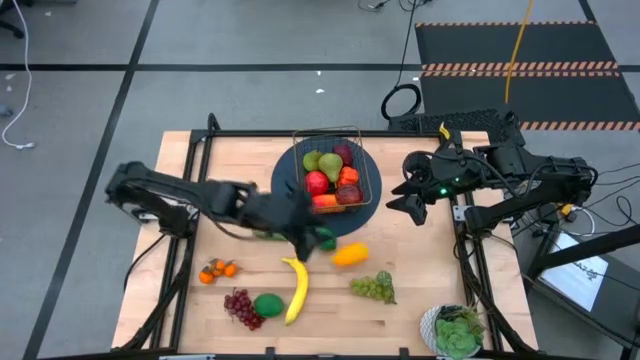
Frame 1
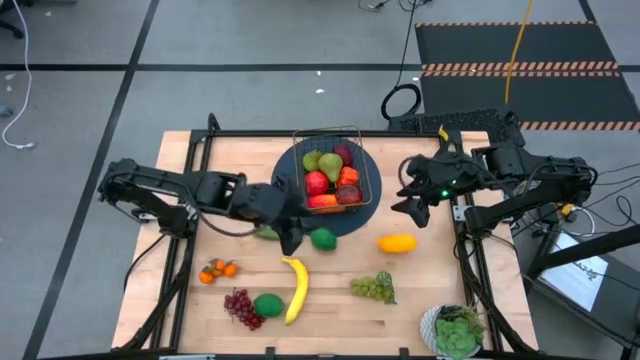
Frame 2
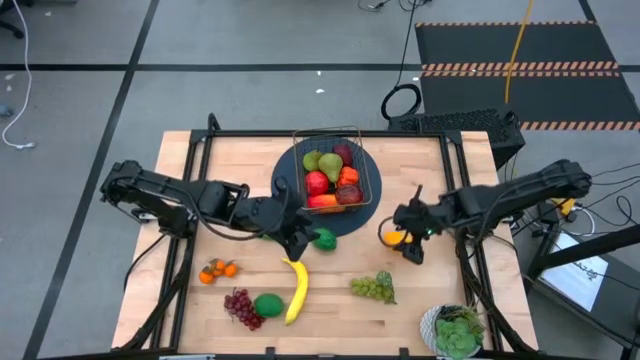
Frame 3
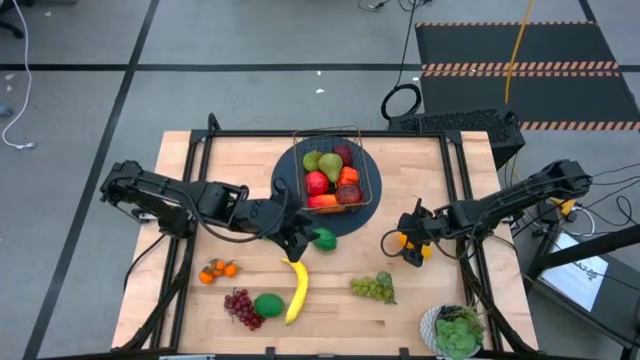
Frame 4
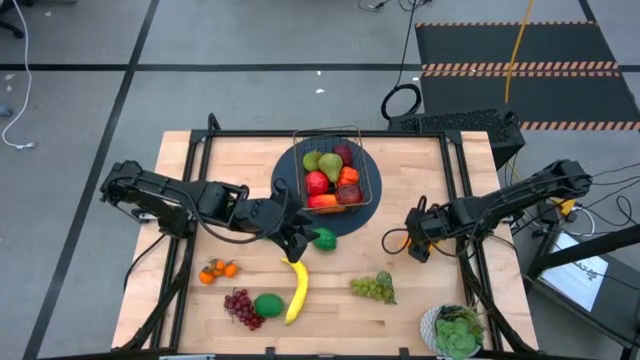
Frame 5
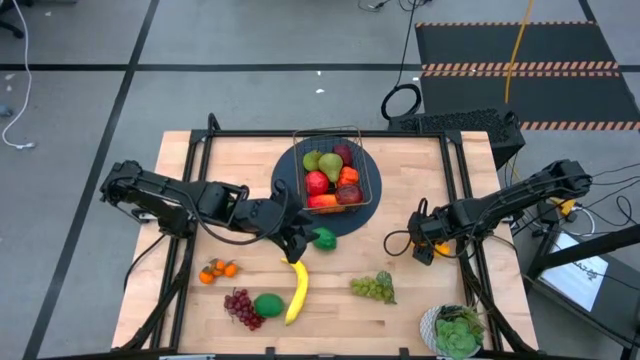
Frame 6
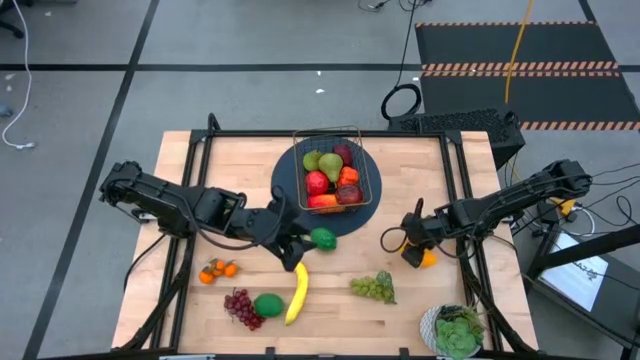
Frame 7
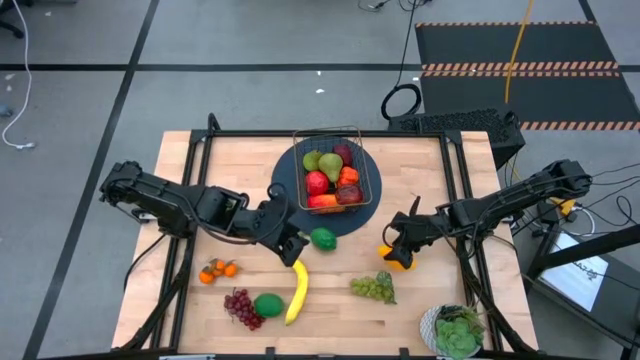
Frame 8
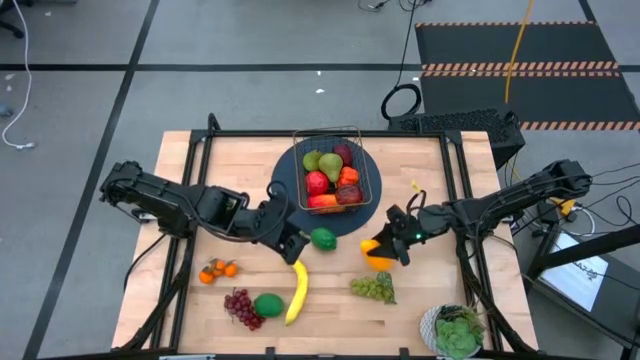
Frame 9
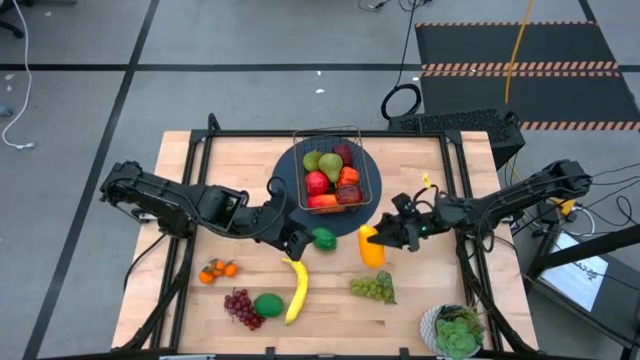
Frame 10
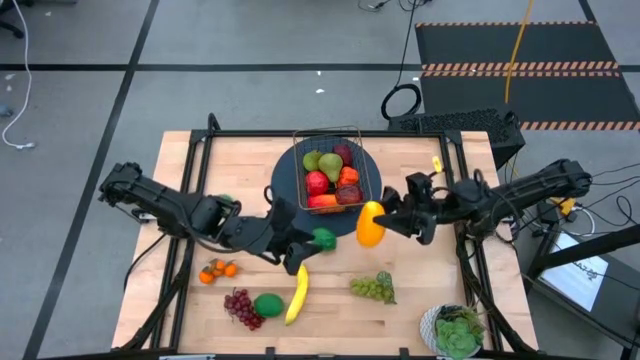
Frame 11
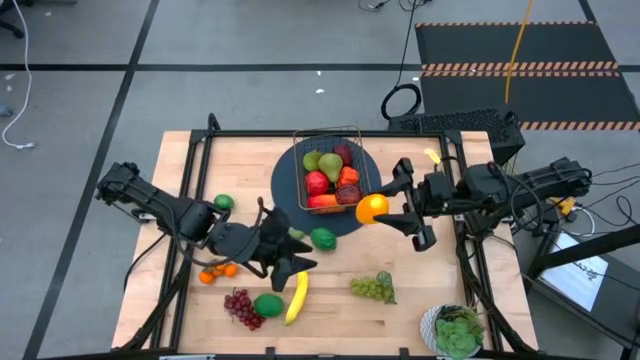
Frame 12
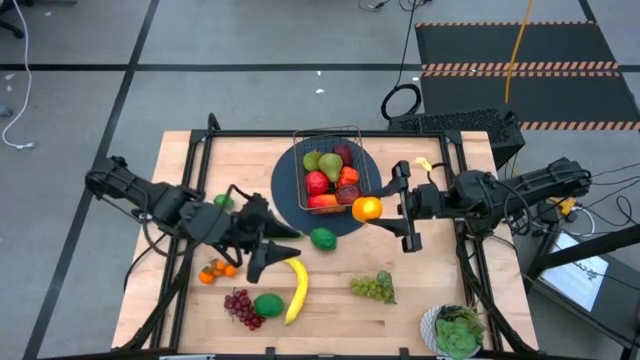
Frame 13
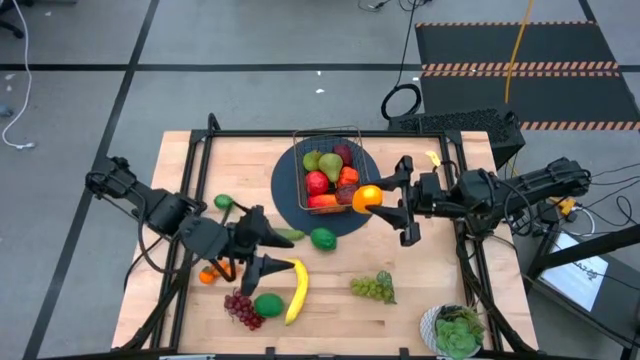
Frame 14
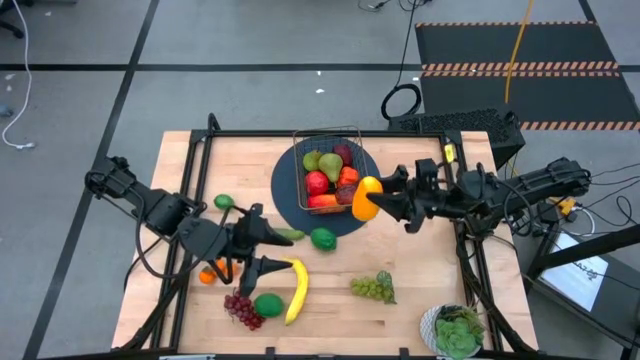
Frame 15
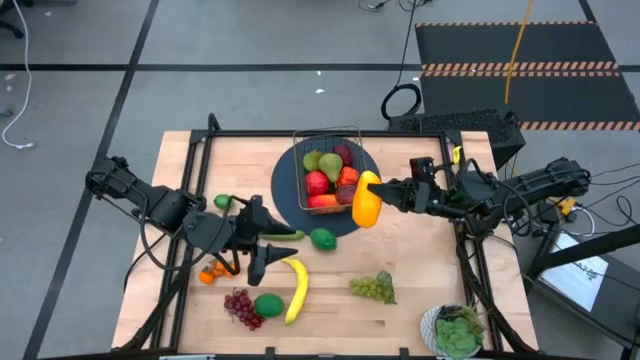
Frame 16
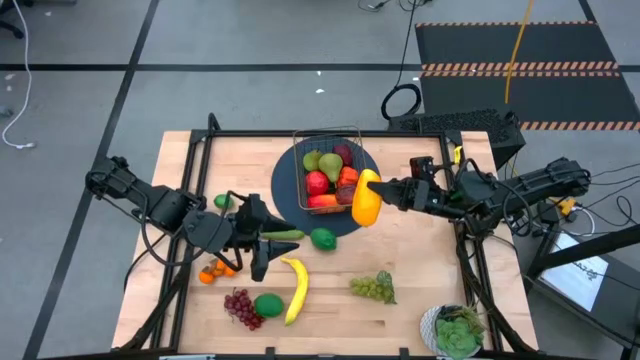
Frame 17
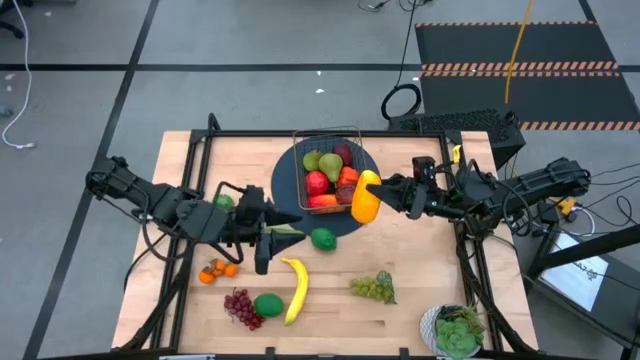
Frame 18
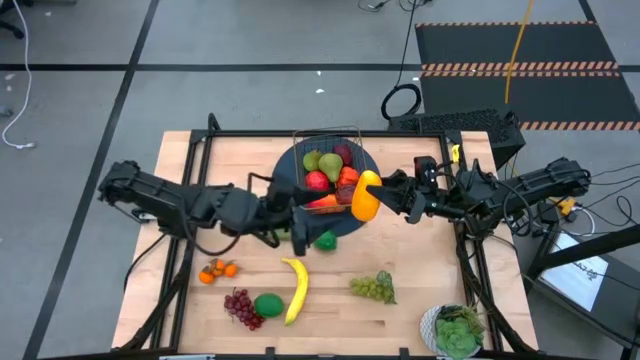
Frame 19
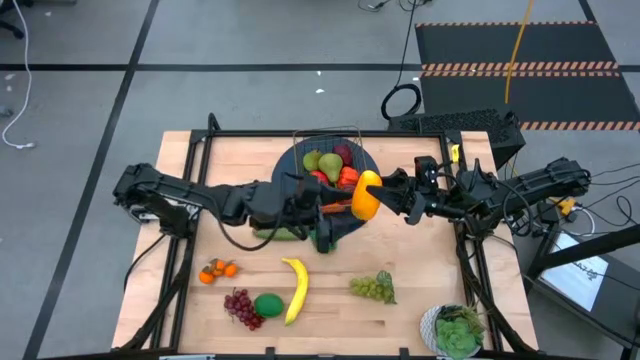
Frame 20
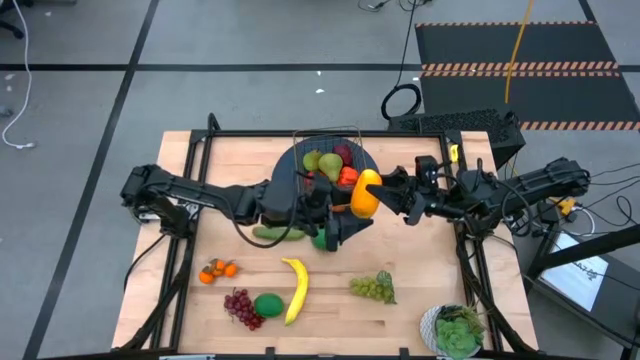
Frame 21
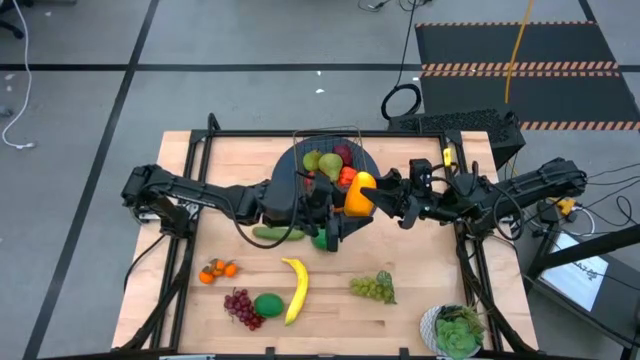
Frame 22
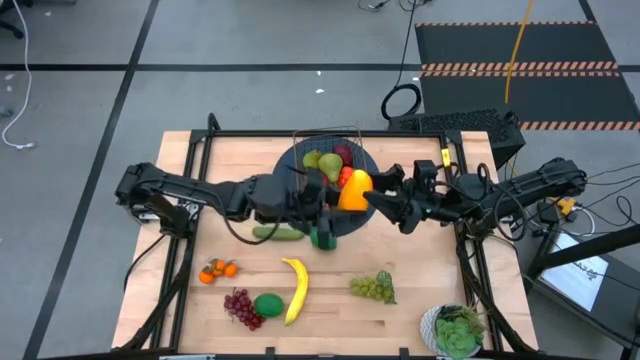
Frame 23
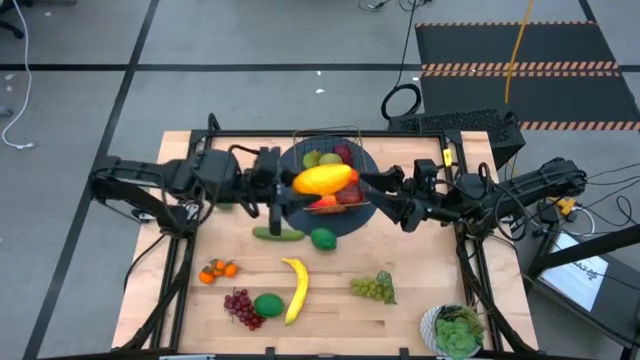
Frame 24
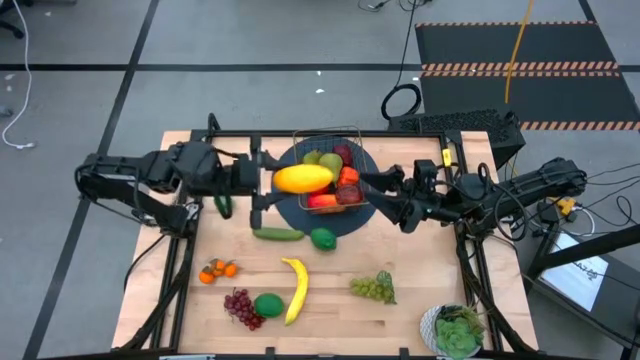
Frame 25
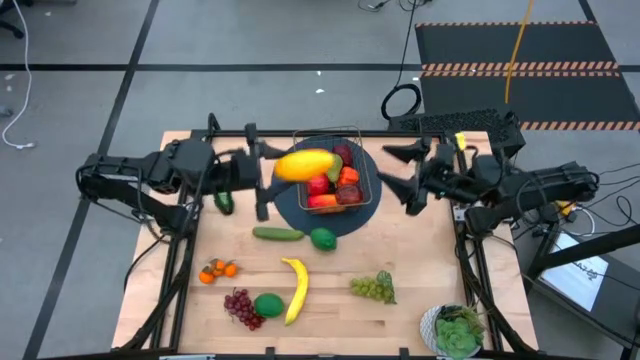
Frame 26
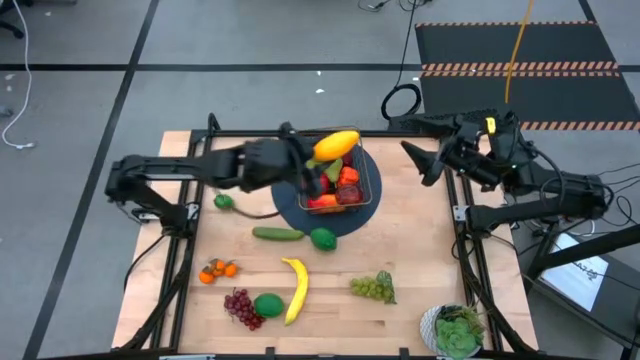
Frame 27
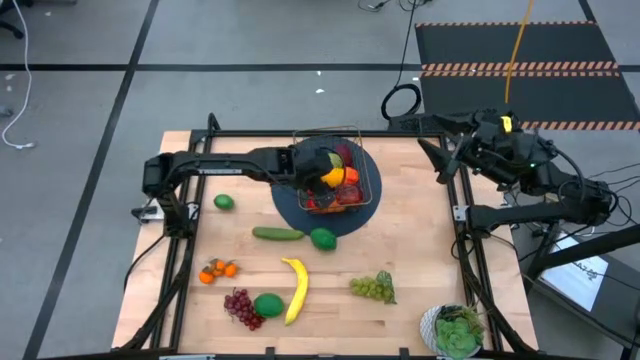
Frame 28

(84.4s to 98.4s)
Task: Build produce basket
Put the yellow mango into the gold wire basket

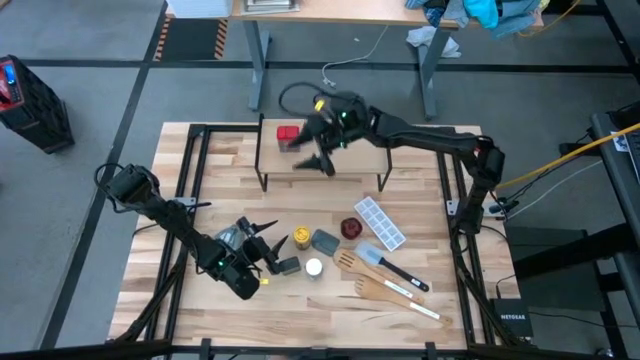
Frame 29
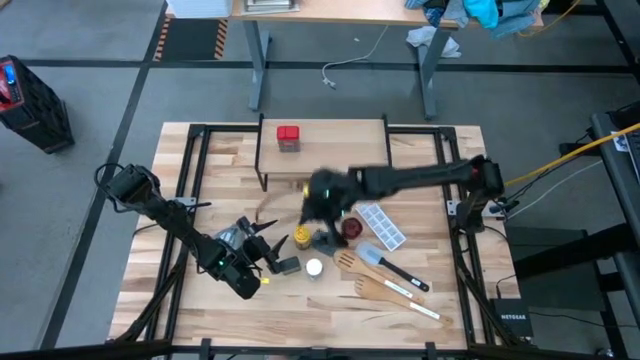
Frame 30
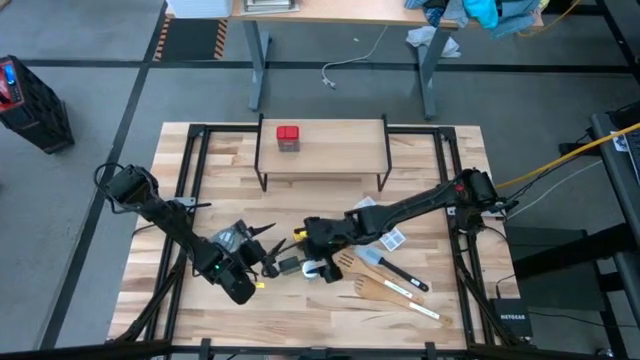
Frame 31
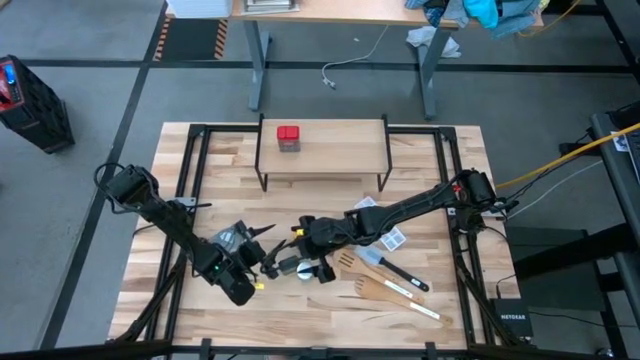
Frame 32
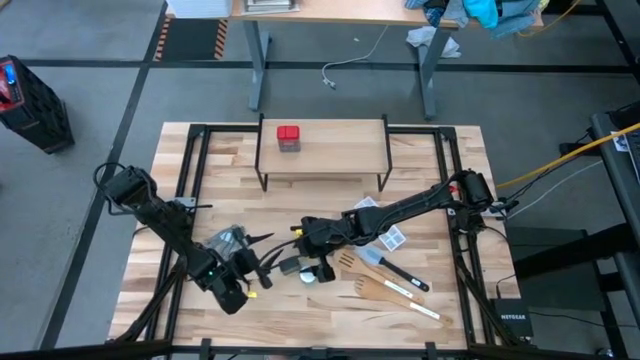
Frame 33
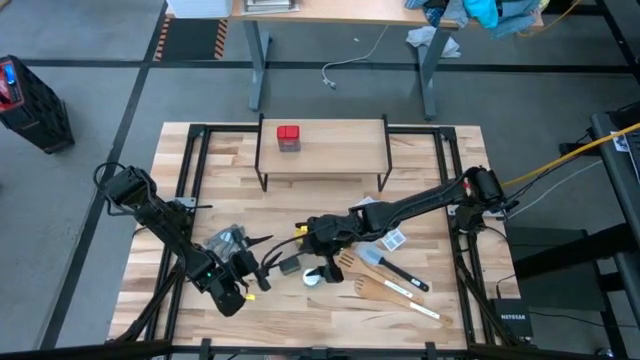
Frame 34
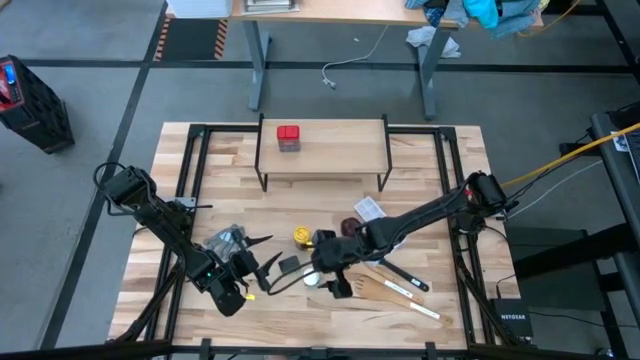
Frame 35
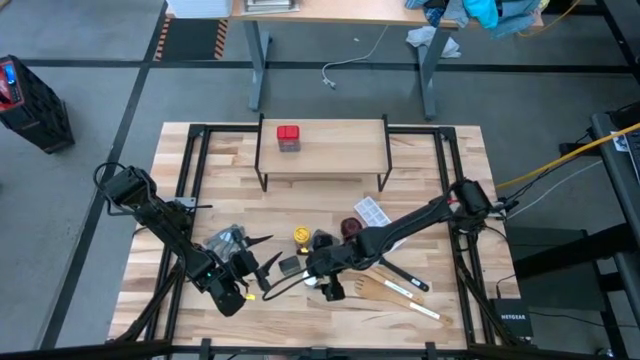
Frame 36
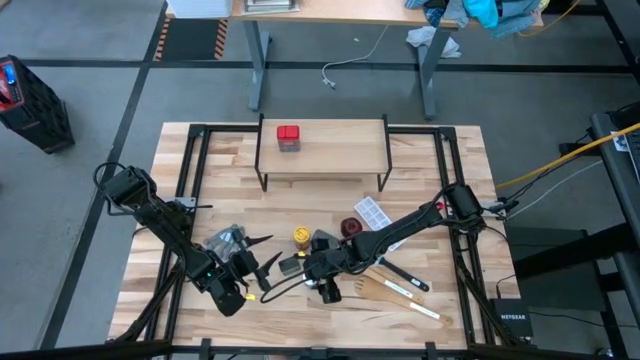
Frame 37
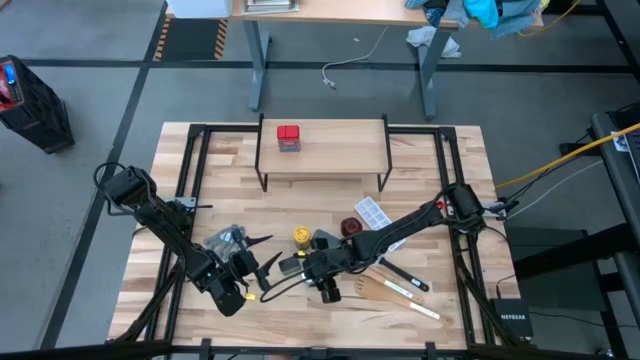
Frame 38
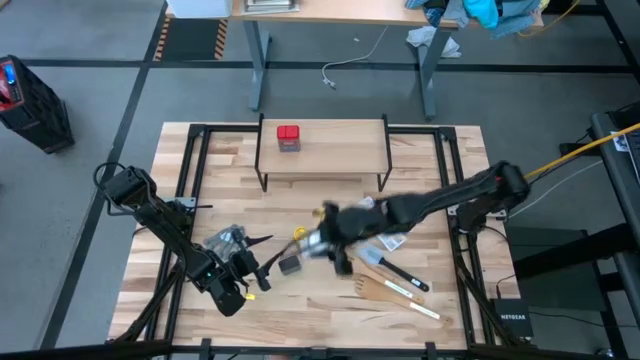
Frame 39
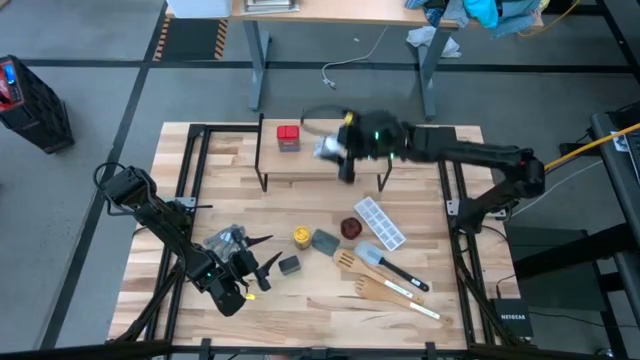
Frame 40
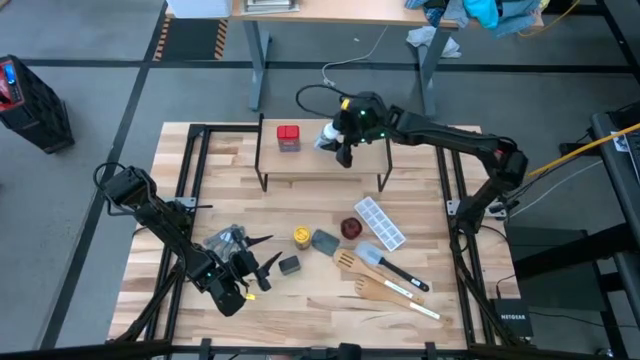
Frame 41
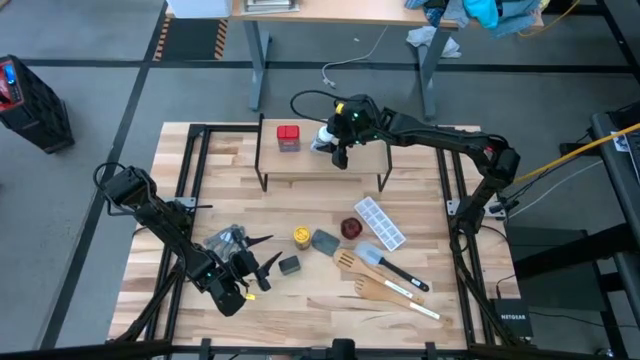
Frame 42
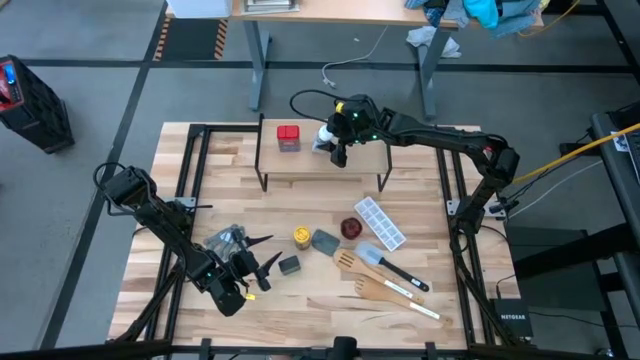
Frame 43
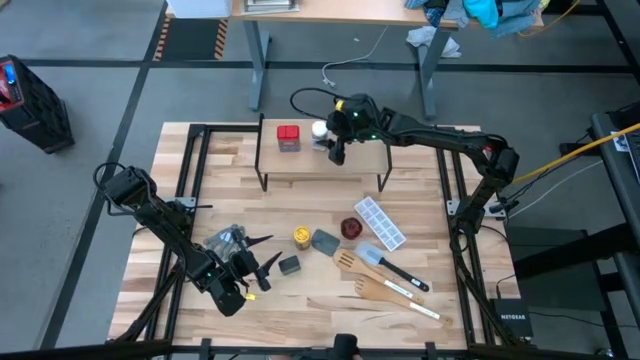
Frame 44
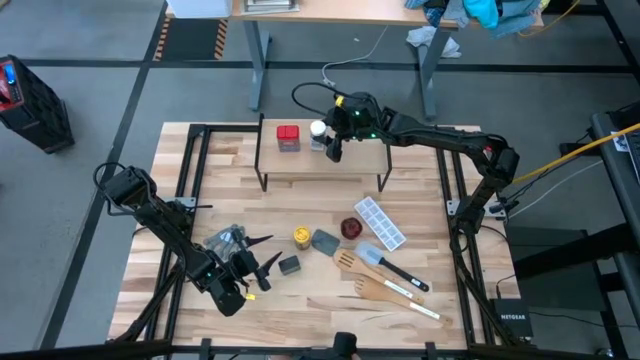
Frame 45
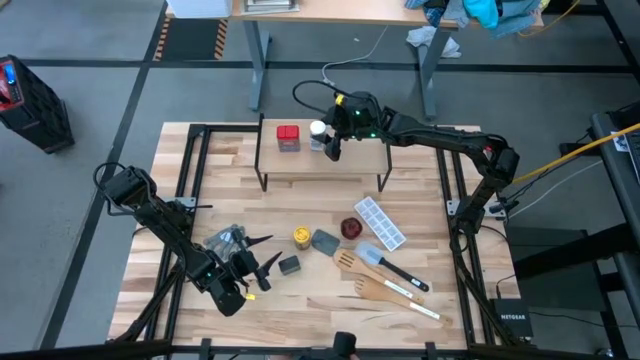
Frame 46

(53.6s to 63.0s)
Task: Shelf spices
Put the white seasoning bottle on the shelf
